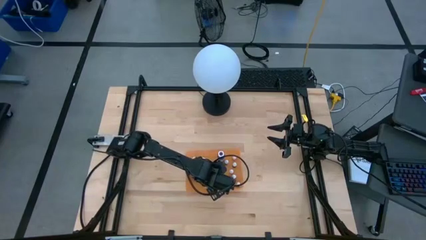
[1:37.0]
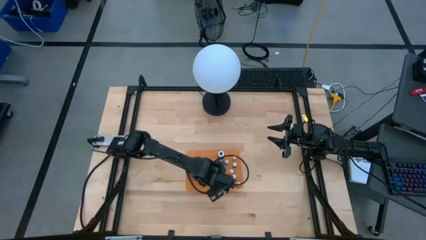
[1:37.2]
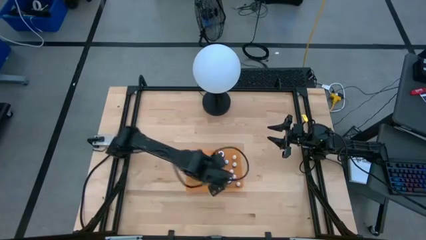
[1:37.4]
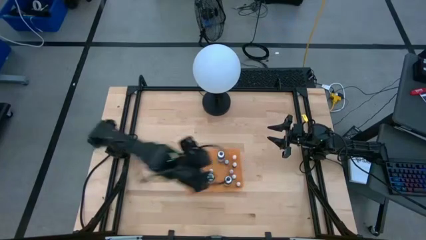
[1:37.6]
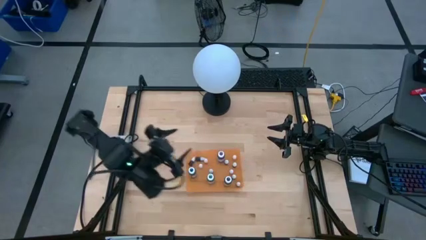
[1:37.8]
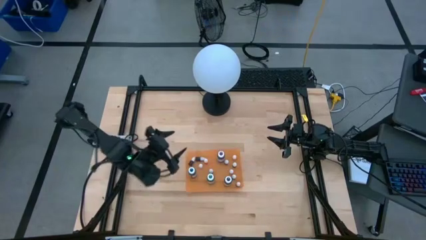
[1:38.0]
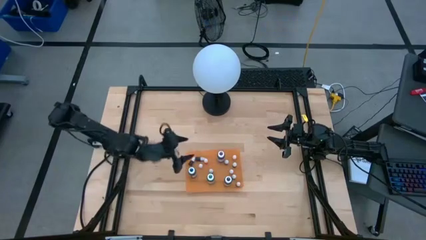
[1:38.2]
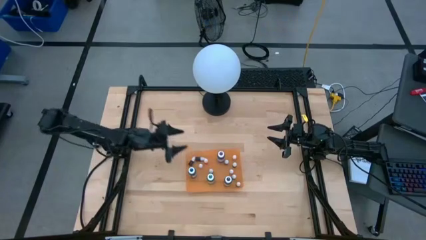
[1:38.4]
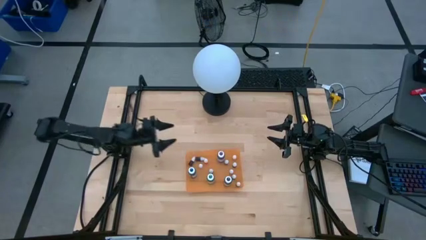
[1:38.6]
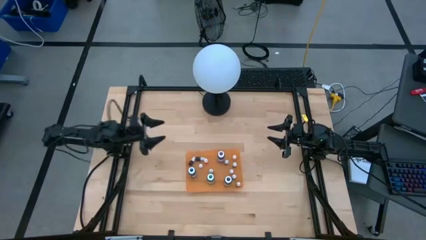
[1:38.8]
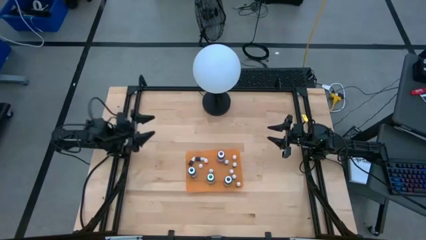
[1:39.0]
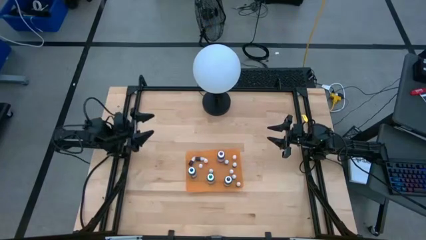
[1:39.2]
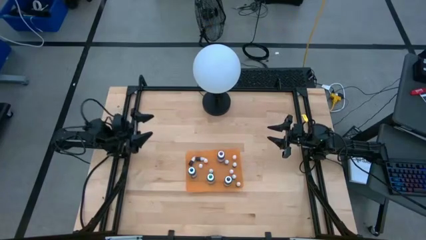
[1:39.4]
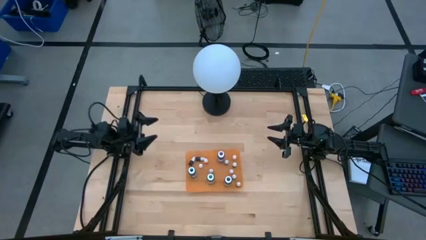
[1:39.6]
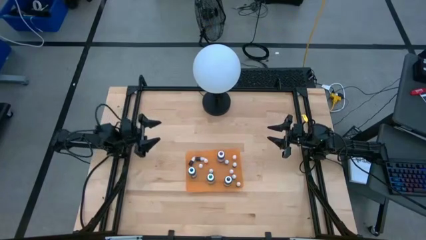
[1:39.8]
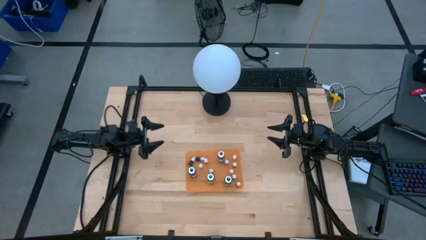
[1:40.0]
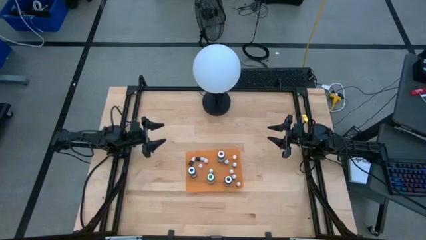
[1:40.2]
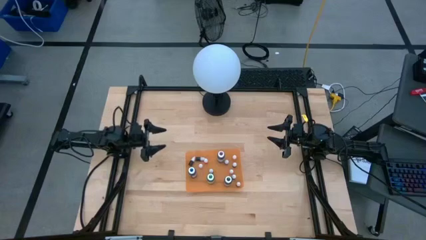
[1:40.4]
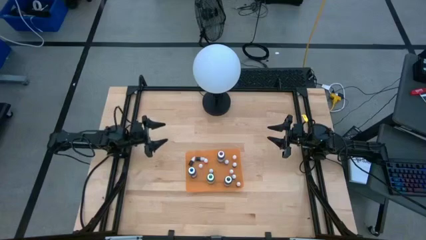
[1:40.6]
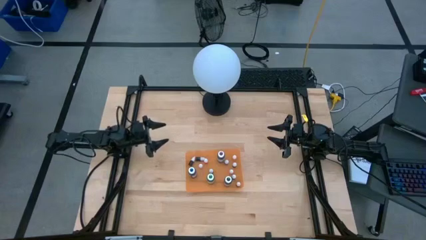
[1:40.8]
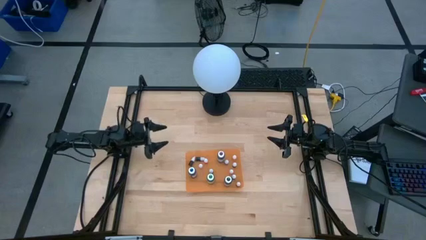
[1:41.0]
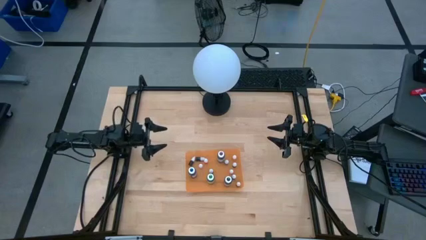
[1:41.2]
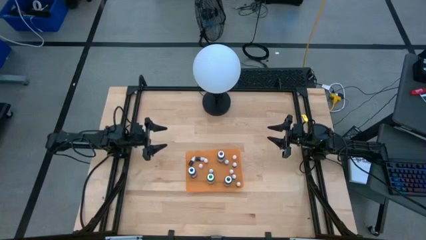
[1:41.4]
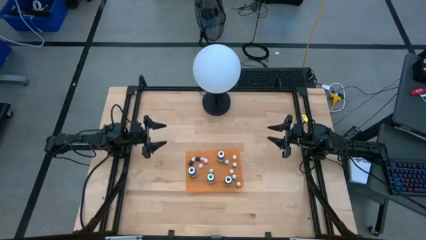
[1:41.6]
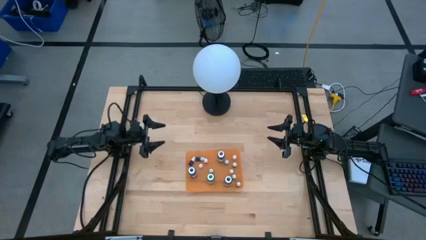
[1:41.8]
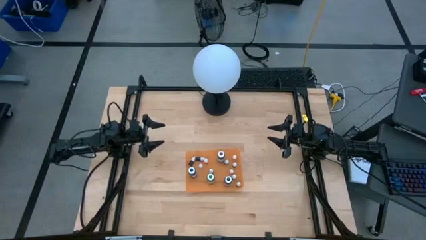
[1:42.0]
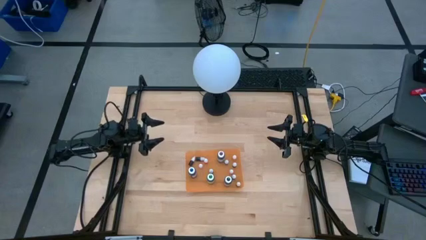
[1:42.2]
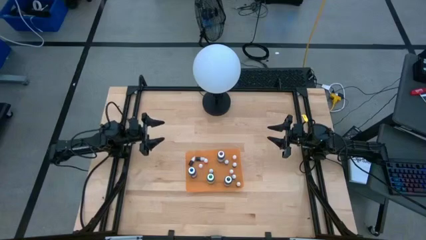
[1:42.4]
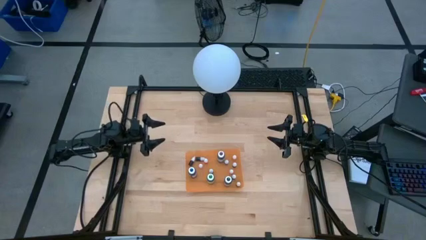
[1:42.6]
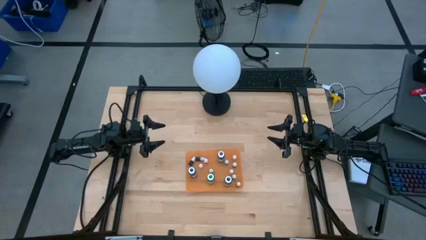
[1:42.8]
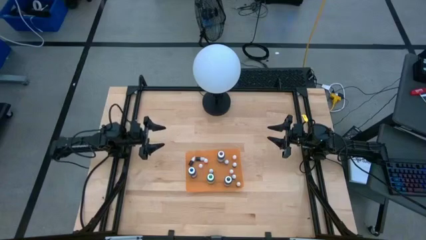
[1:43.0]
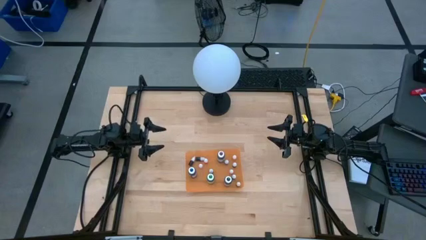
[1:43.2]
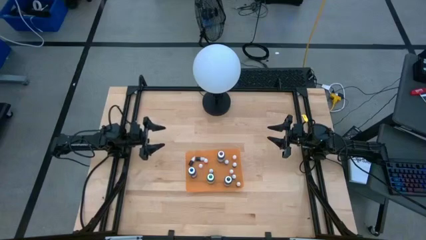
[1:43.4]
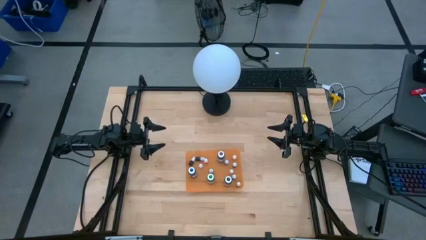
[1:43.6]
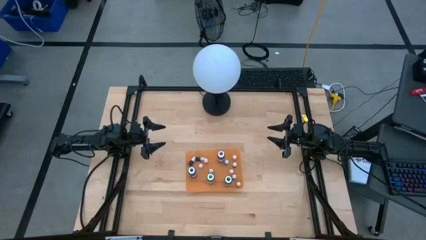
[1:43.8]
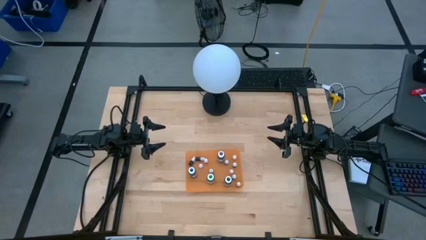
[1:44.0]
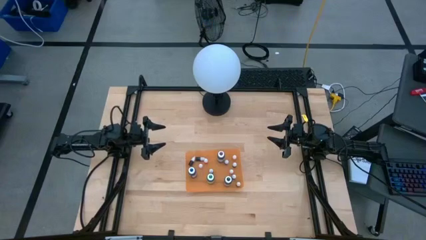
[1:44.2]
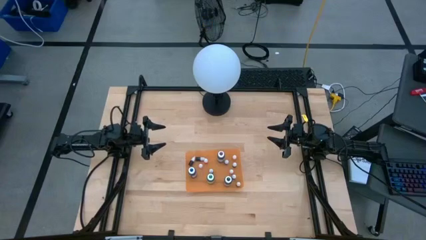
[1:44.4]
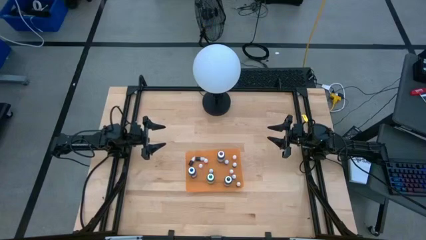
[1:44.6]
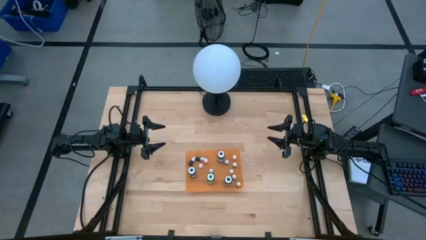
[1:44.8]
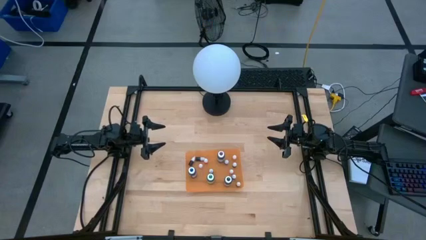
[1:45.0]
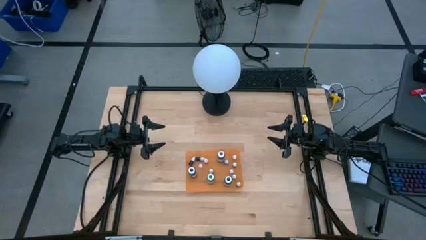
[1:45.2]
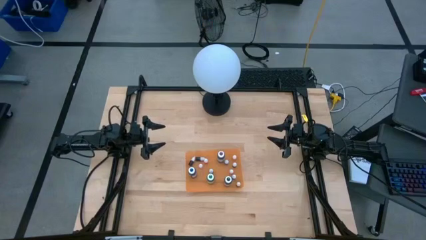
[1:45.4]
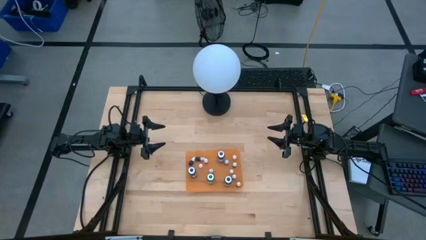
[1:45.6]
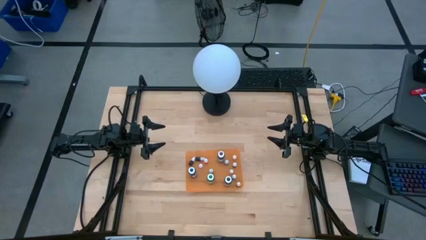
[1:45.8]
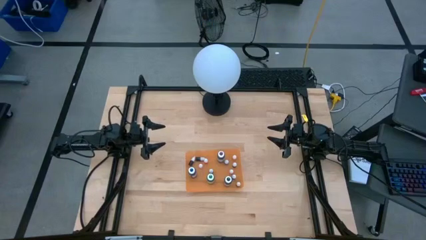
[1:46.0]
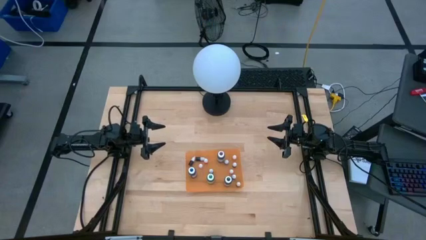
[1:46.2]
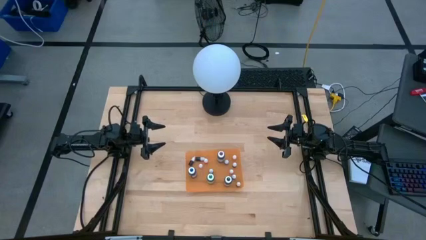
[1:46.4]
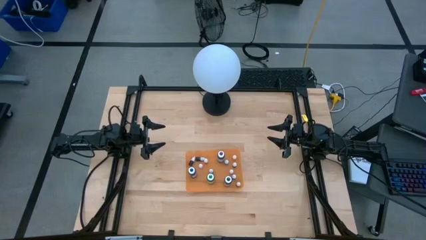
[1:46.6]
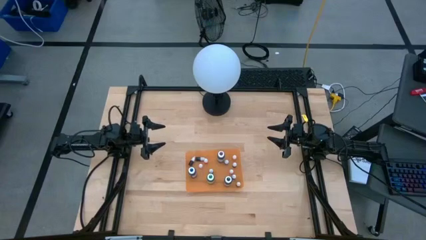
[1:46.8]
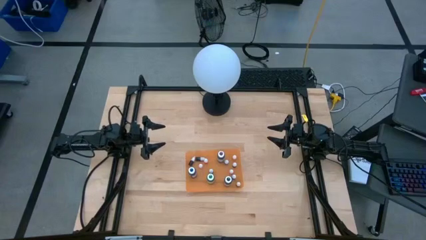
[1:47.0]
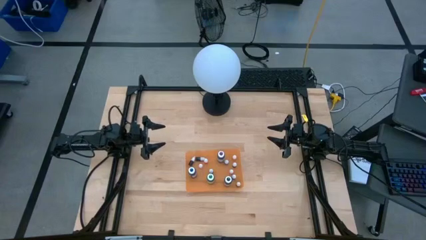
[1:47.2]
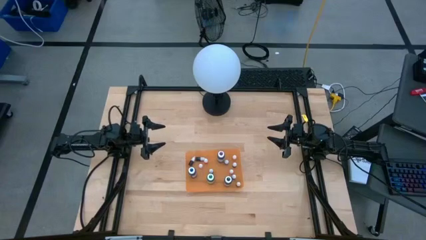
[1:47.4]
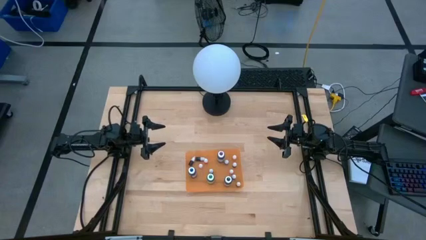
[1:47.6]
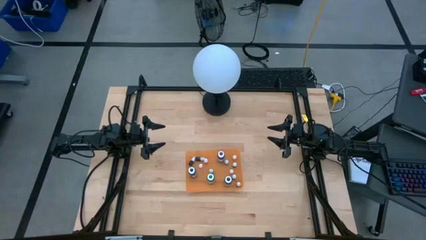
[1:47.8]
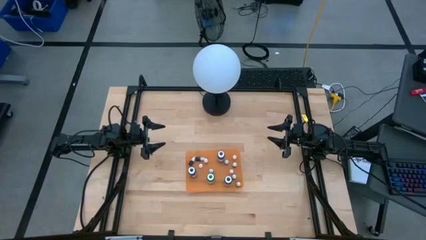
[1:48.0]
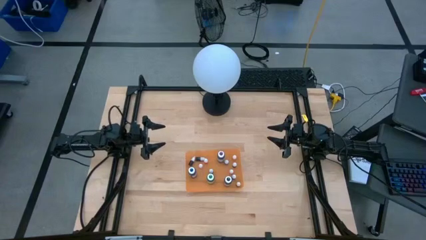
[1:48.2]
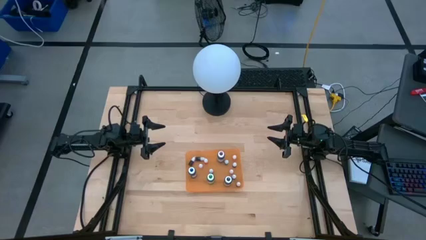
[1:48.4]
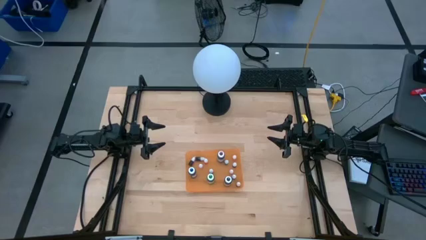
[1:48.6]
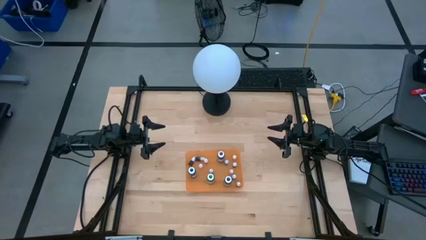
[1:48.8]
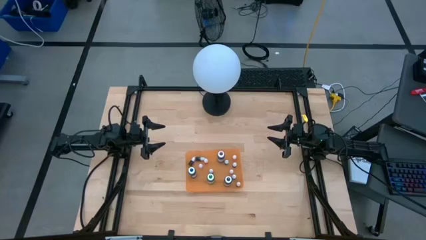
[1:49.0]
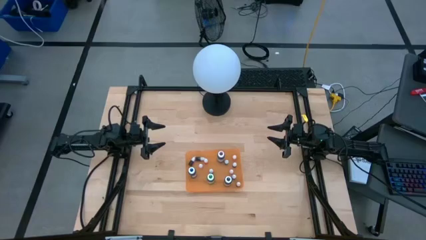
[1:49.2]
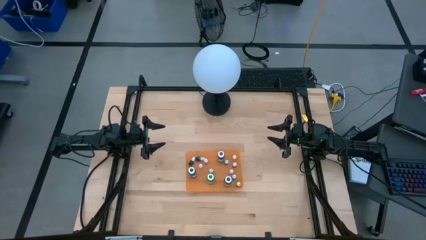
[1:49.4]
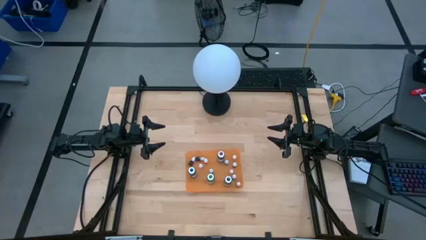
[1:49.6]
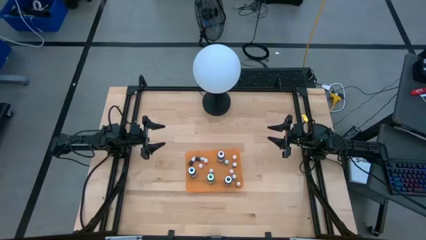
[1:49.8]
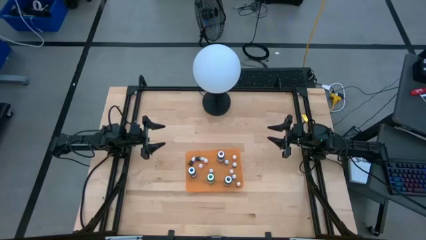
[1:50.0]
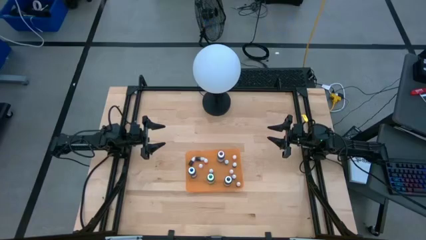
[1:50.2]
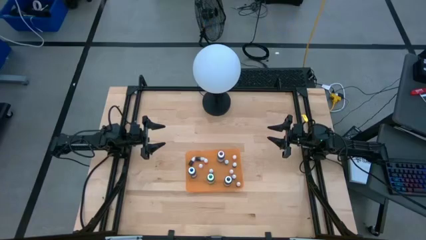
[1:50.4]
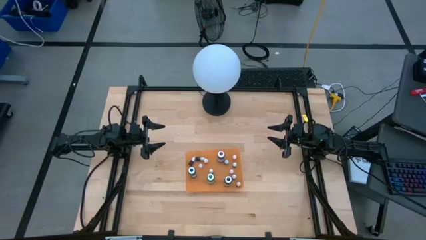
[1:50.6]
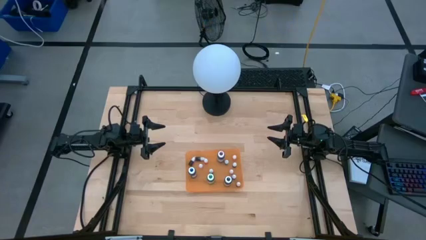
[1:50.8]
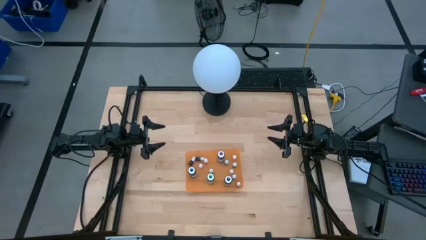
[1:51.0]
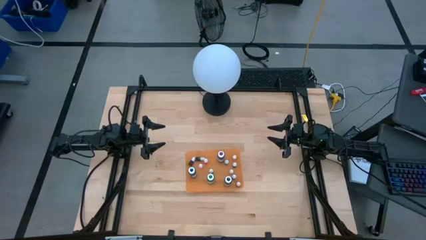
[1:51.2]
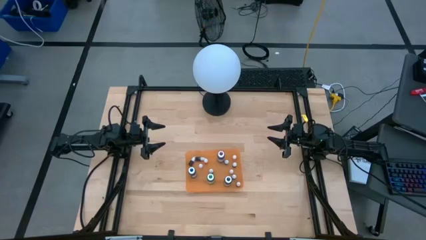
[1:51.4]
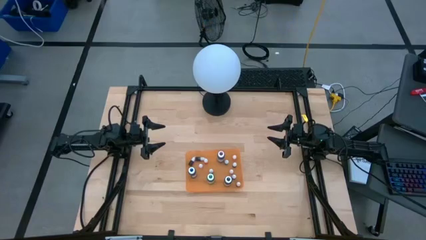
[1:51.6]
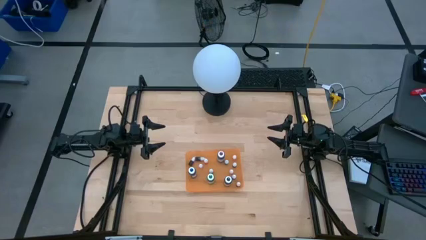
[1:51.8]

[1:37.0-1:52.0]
Task: Pick & Place food coloring
Return to Home Position
